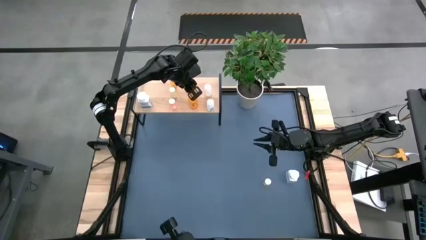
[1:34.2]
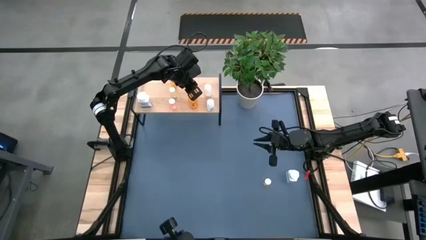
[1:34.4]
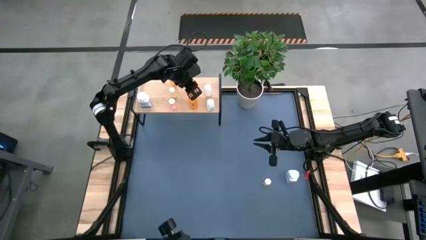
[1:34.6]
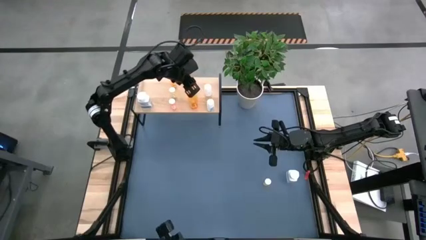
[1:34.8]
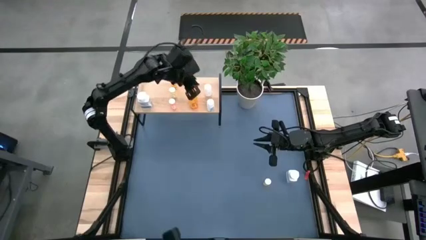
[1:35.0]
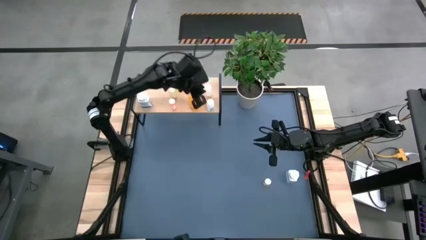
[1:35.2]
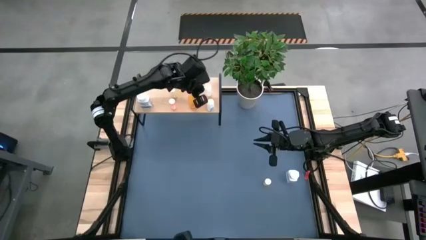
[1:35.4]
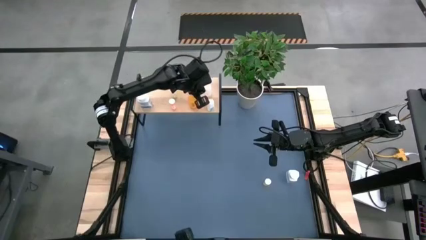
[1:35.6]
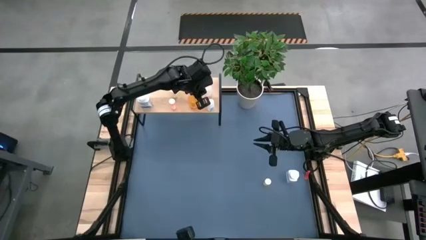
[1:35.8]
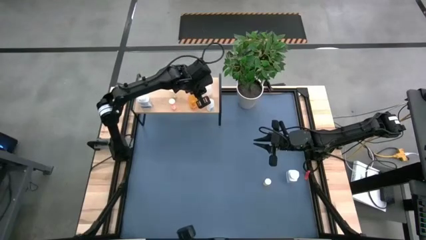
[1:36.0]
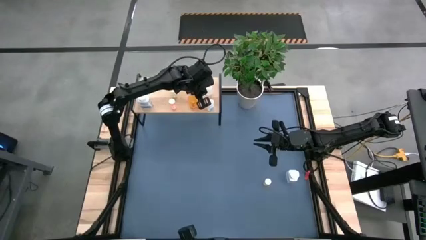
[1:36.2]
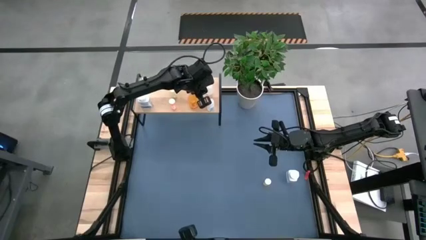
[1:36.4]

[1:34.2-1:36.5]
Task: Pick and place medicine bottles onto shelf by color
Adjust the transparent pill bottle

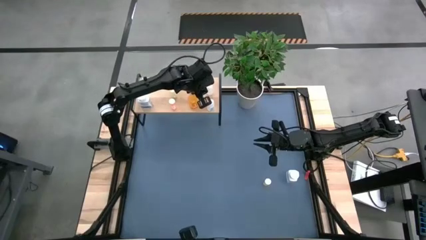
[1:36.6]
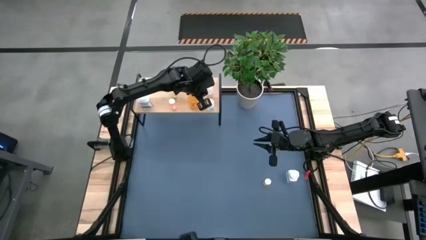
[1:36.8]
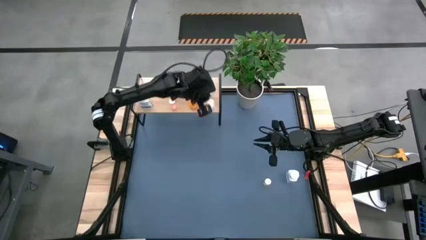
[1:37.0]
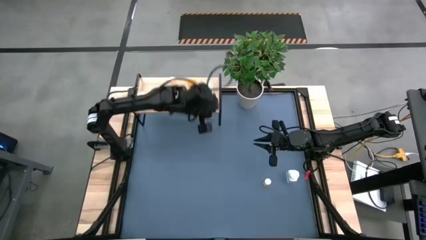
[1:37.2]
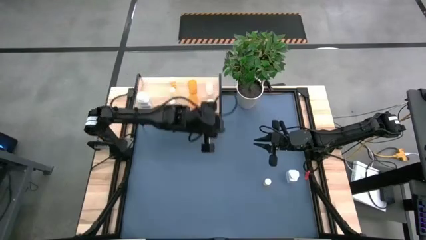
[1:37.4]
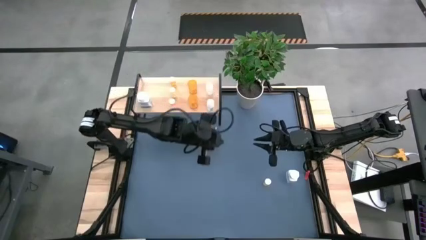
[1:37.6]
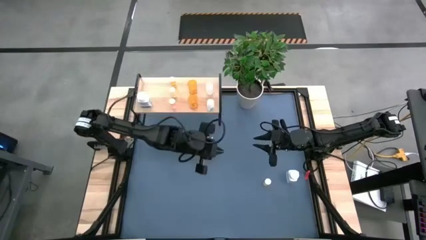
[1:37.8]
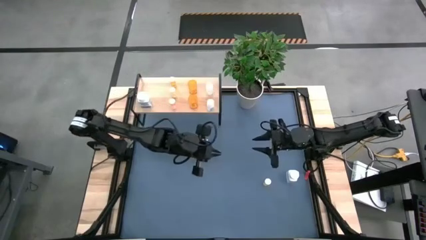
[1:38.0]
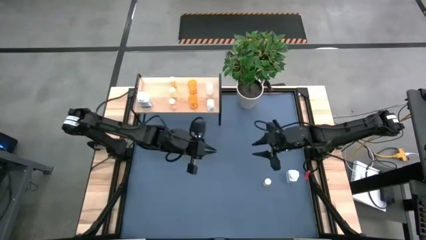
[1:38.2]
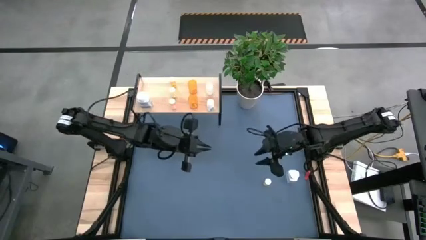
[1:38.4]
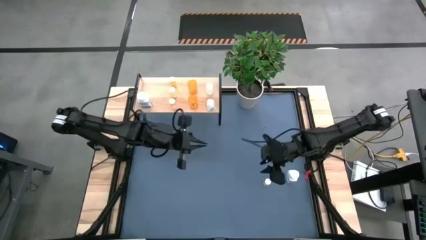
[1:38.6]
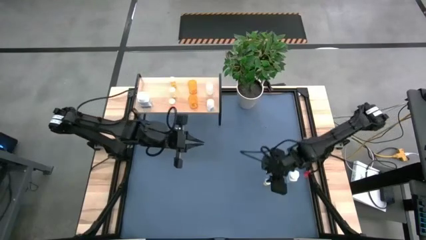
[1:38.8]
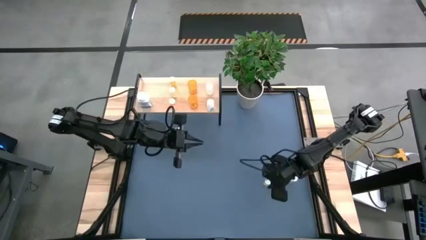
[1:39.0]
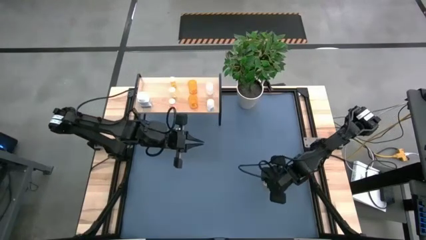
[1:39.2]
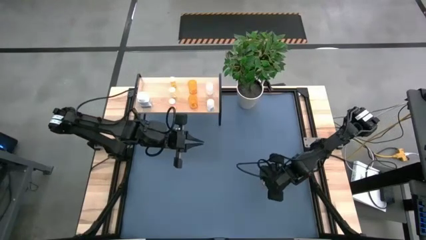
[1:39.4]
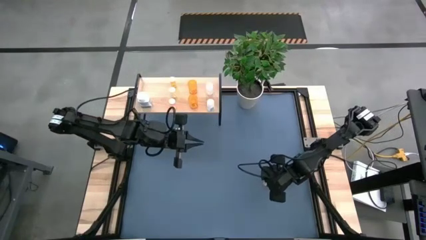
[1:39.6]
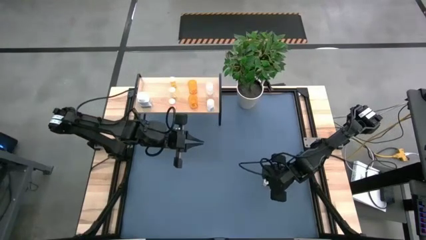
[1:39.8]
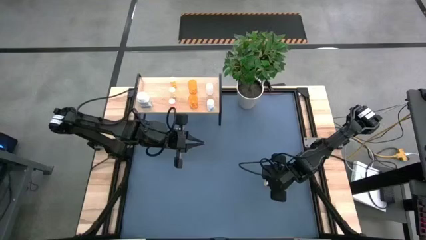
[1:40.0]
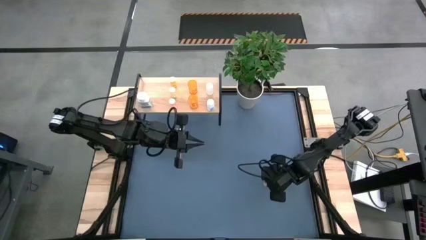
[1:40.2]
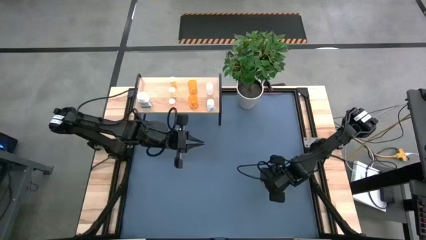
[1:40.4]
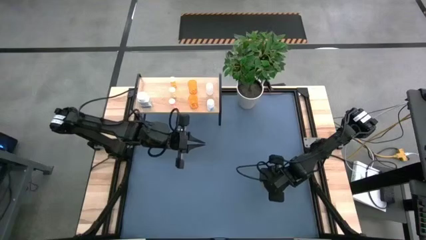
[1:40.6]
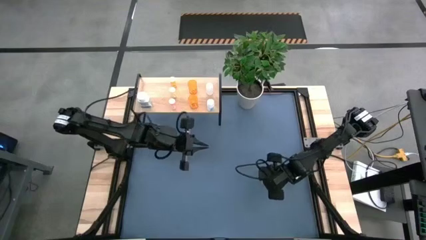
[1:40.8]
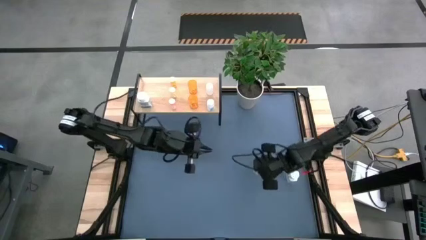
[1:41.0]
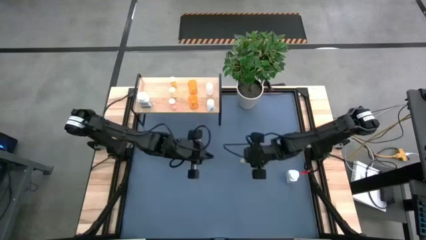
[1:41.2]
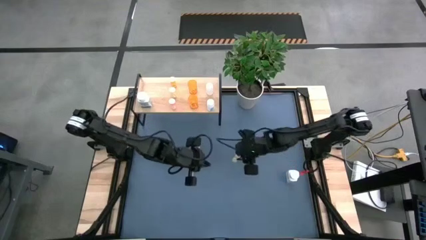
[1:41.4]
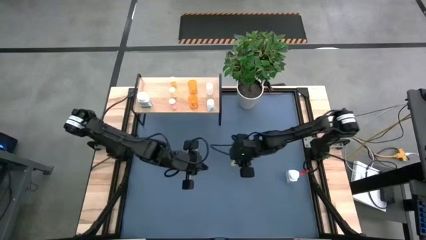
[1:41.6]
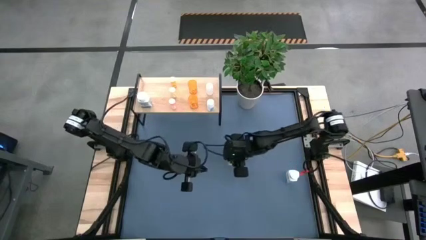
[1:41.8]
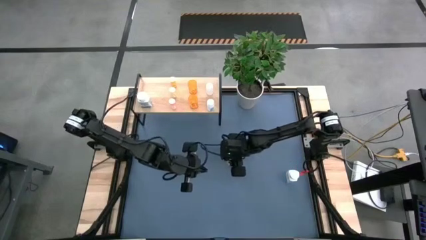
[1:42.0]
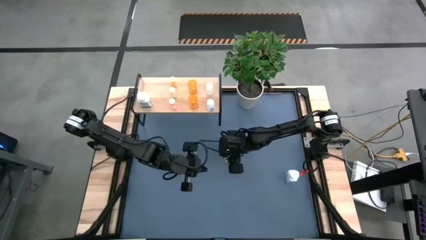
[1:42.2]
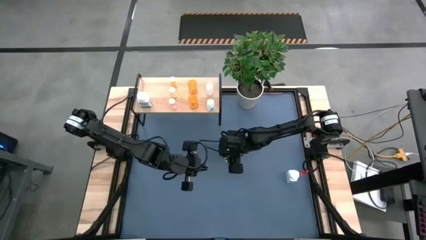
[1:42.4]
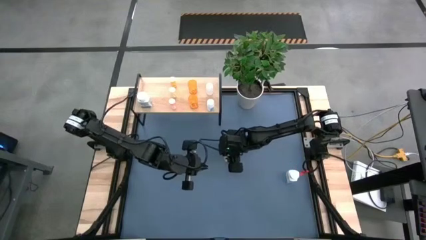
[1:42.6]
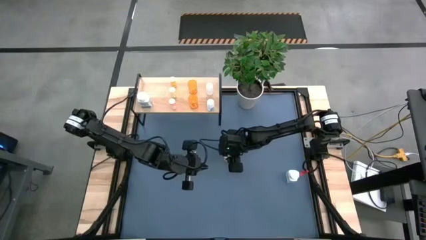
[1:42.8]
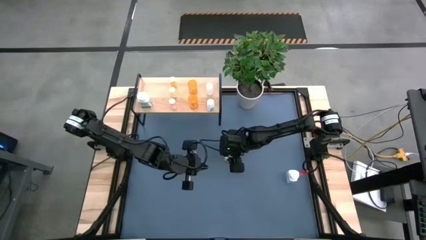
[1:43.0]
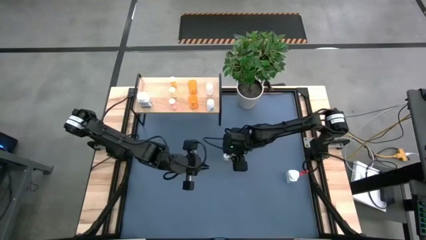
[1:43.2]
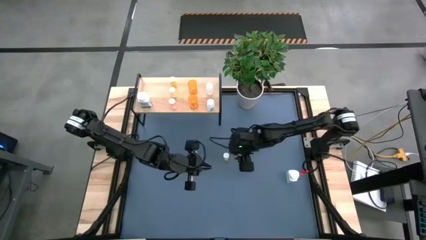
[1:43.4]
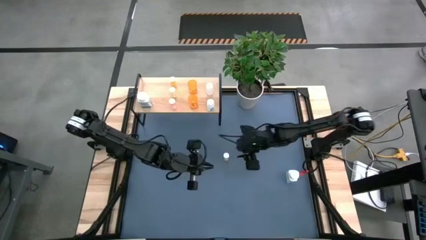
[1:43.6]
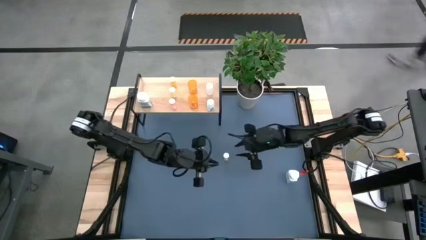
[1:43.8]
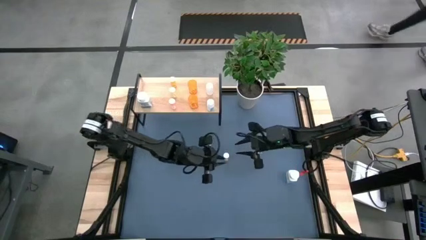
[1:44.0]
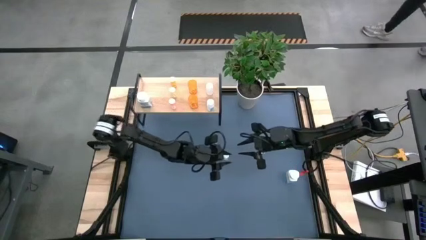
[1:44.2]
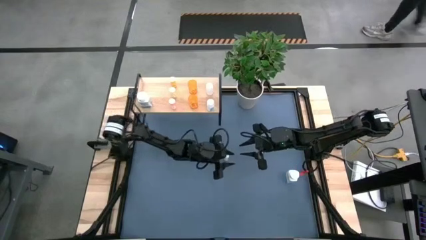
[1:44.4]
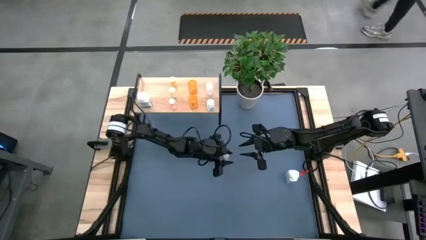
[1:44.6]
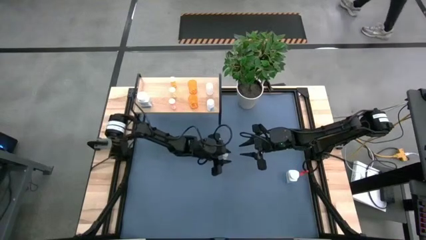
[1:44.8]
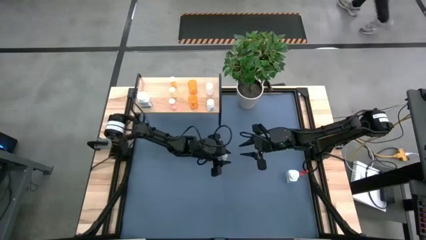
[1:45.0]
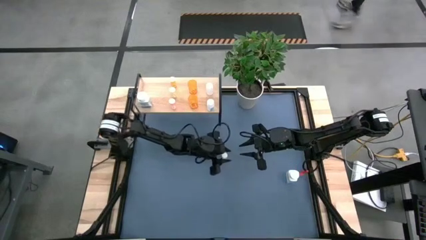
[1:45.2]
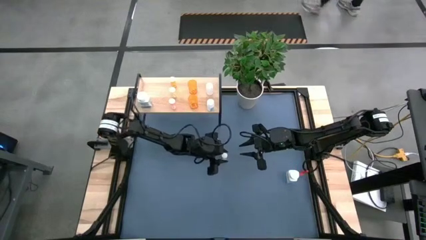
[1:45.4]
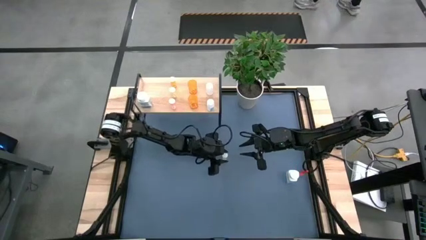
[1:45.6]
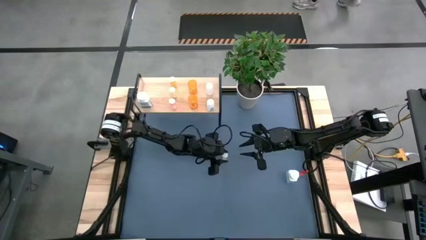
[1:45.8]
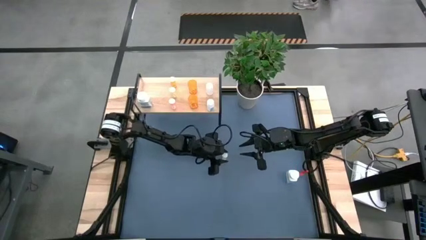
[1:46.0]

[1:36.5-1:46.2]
Put the yellow pill bottle on the shelf

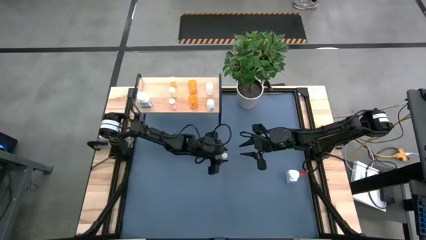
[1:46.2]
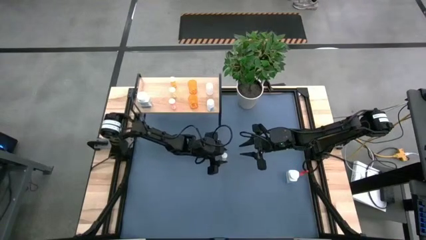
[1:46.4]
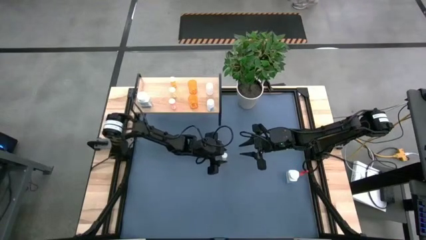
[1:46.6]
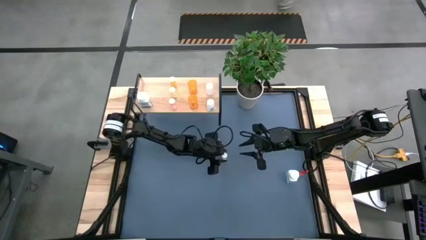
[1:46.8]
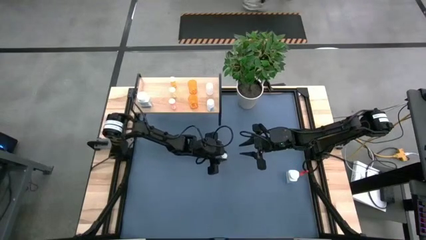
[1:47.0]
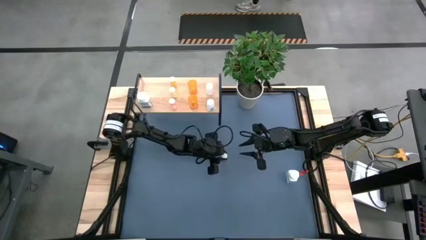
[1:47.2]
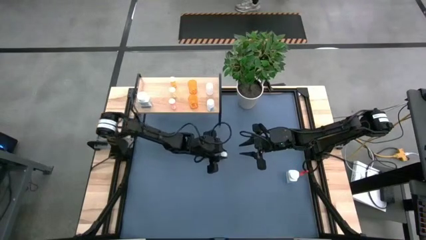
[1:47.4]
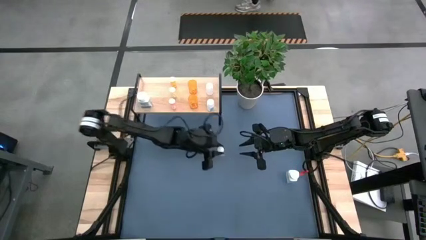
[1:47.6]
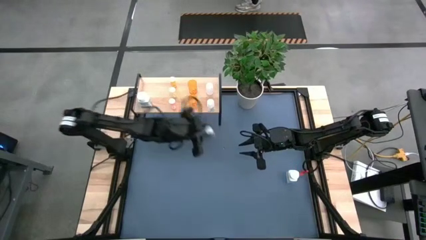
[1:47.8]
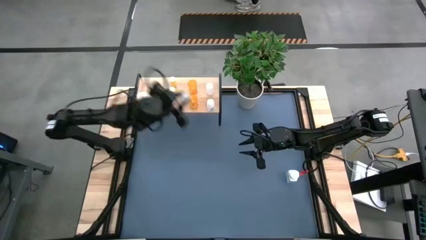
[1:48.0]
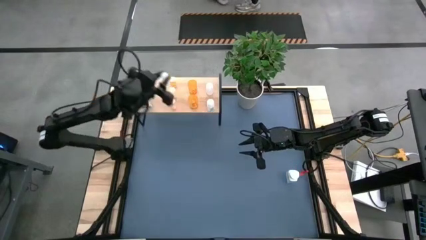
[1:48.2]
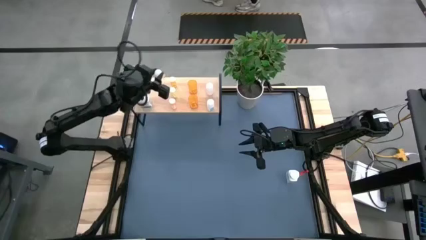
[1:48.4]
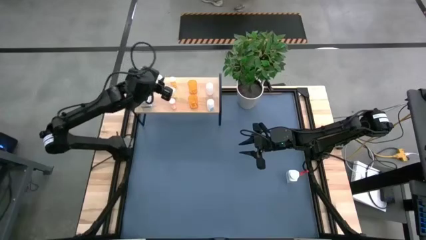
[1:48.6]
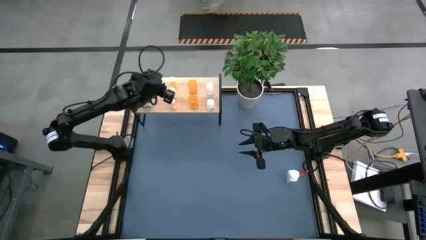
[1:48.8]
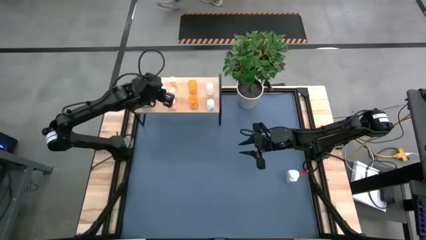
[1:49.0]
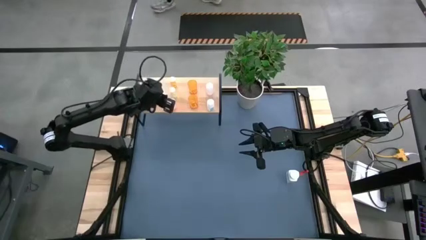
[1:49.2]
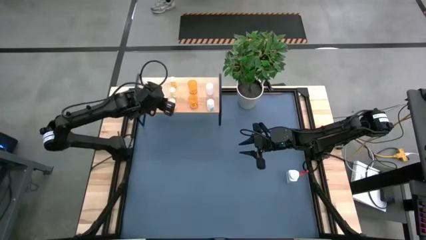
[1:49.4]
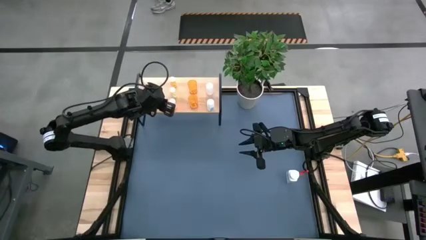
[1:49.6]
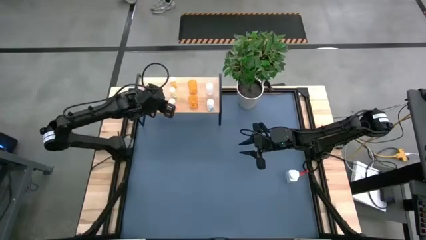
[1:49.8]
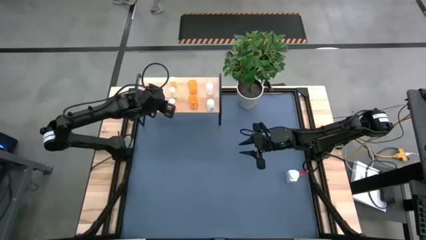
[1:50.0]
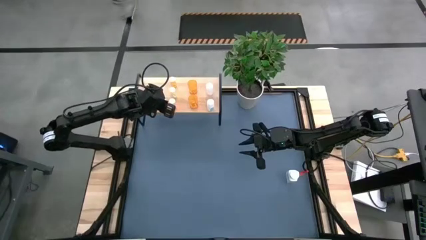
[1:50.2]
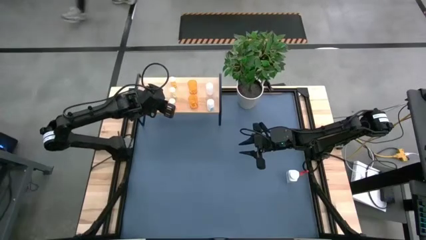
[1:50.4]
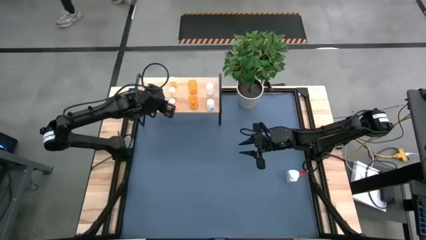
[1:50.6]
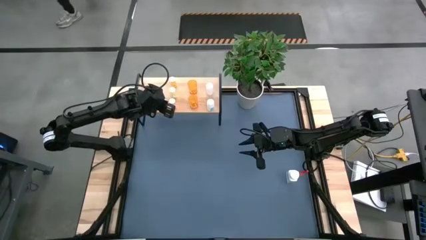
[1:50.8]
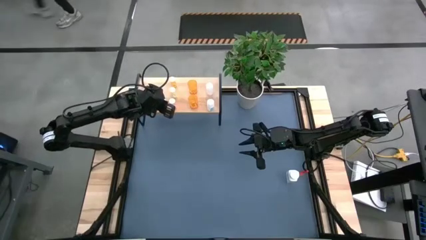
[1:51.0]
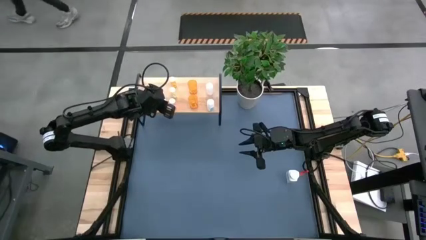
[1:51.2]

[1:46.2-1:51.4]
Put the yellow pill bottle on the shelf
